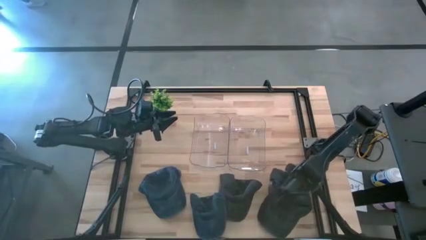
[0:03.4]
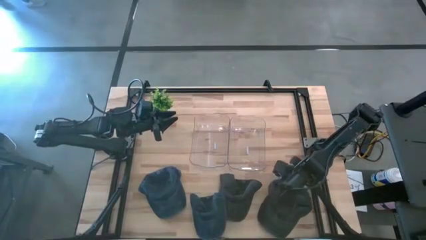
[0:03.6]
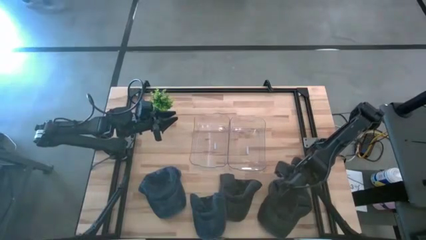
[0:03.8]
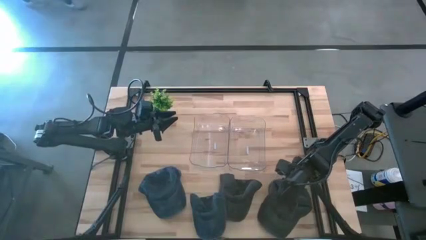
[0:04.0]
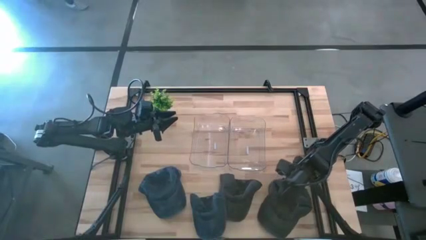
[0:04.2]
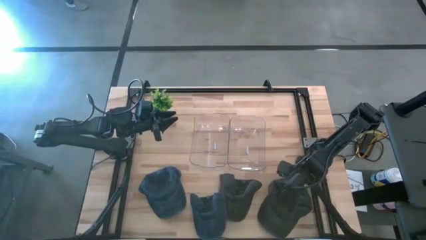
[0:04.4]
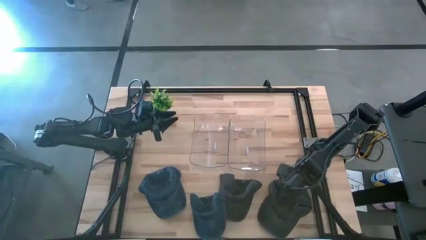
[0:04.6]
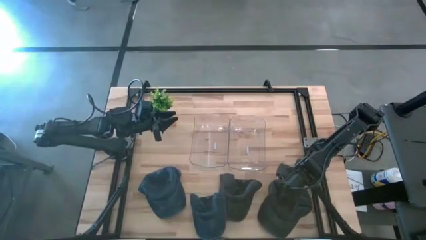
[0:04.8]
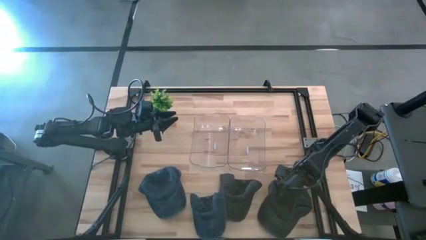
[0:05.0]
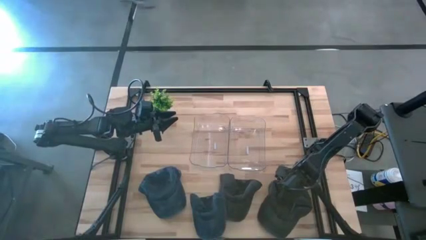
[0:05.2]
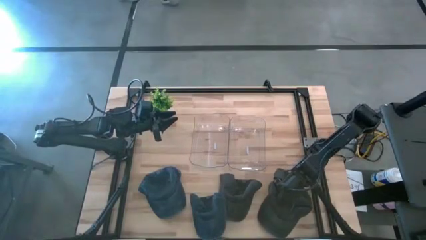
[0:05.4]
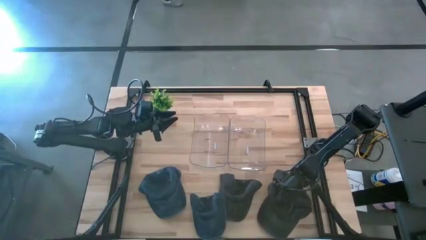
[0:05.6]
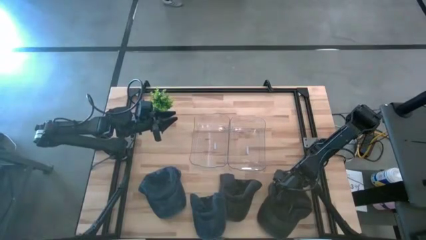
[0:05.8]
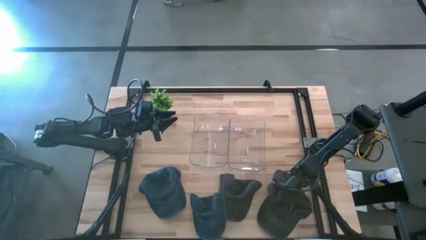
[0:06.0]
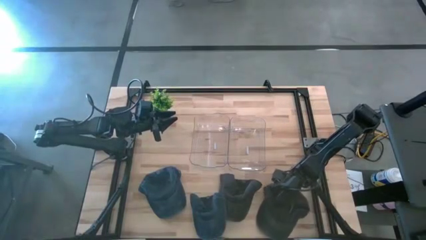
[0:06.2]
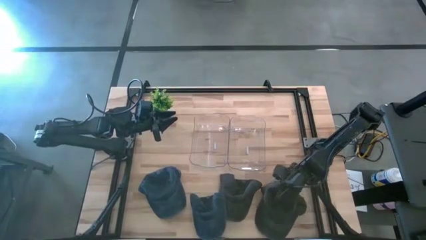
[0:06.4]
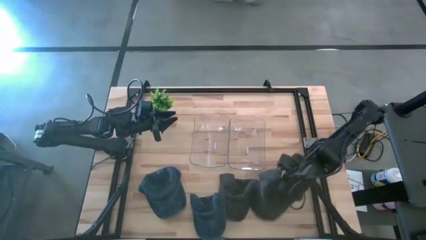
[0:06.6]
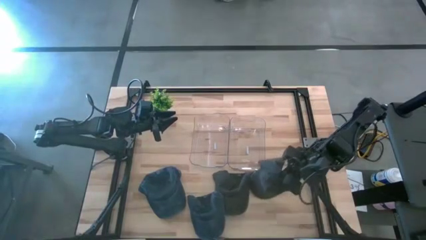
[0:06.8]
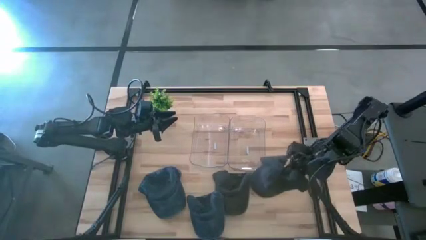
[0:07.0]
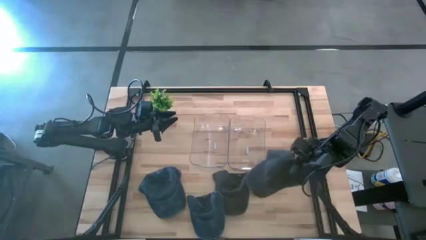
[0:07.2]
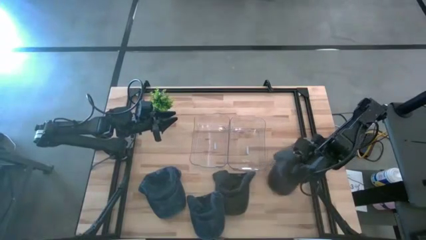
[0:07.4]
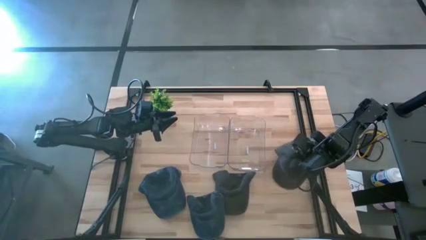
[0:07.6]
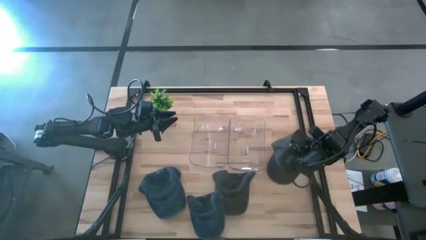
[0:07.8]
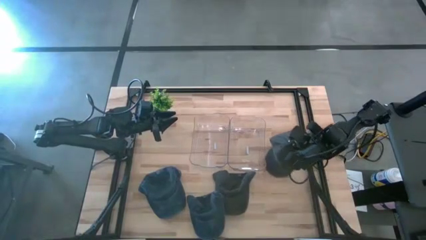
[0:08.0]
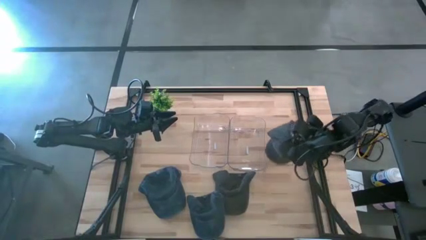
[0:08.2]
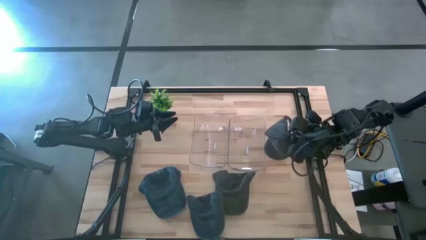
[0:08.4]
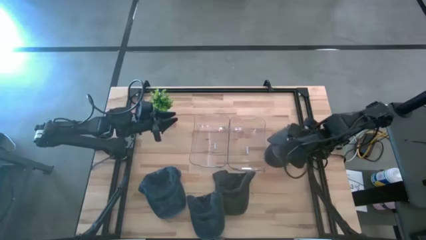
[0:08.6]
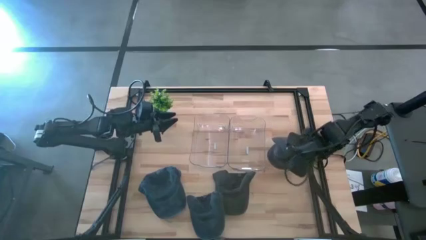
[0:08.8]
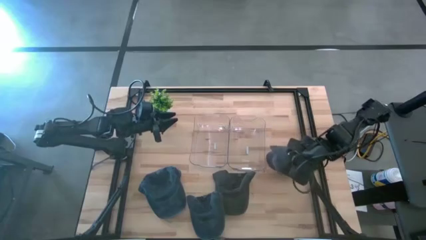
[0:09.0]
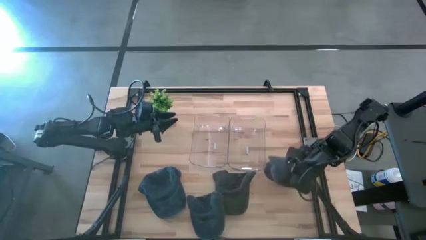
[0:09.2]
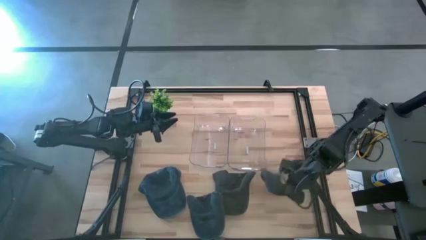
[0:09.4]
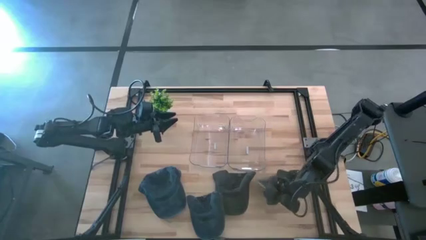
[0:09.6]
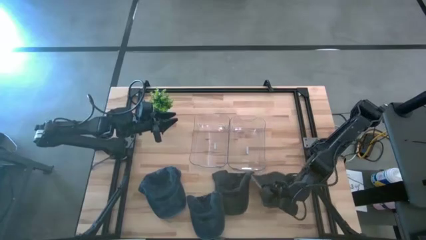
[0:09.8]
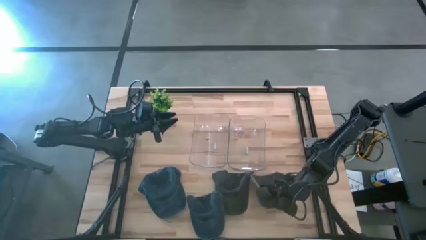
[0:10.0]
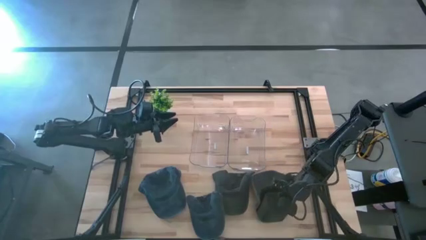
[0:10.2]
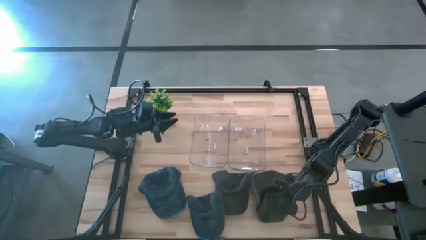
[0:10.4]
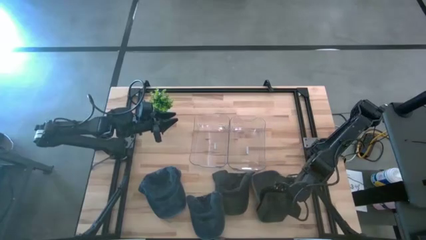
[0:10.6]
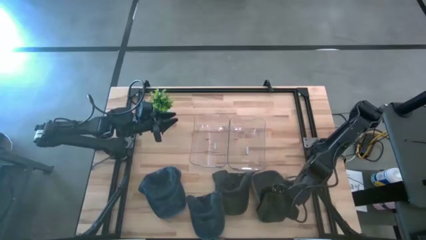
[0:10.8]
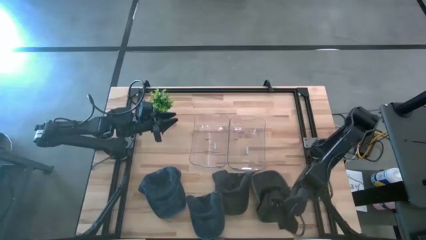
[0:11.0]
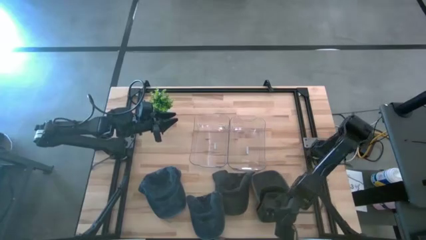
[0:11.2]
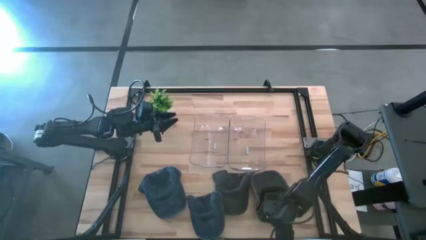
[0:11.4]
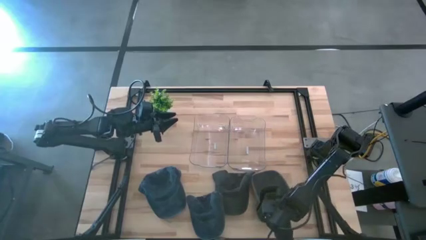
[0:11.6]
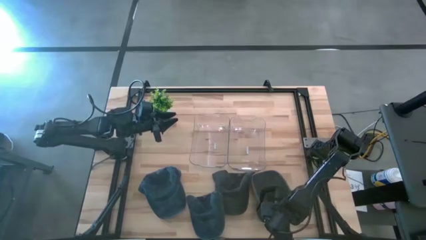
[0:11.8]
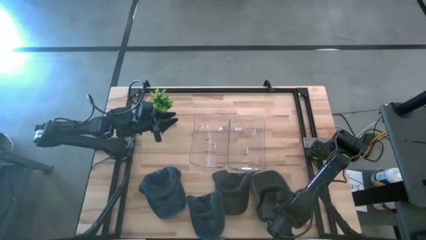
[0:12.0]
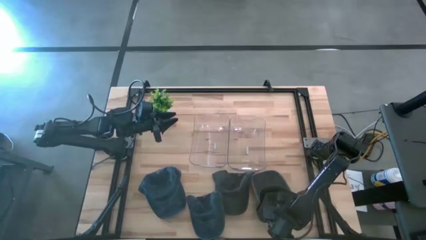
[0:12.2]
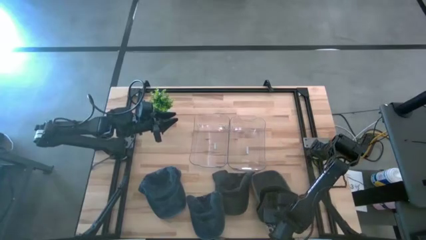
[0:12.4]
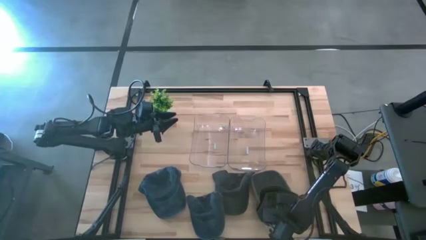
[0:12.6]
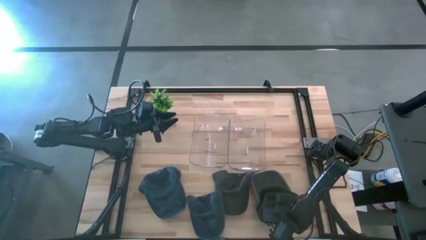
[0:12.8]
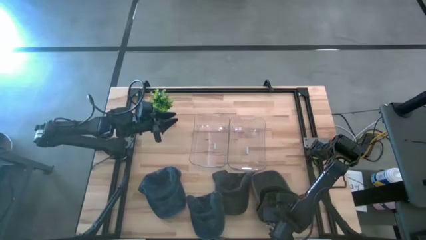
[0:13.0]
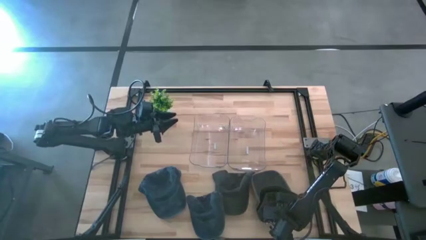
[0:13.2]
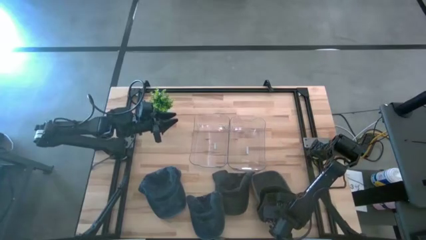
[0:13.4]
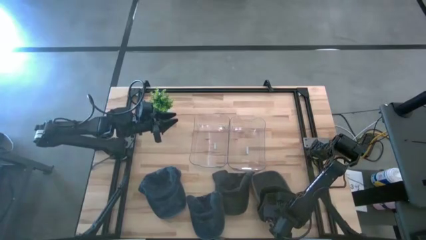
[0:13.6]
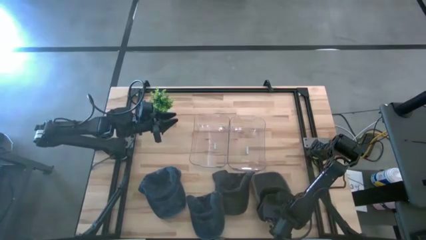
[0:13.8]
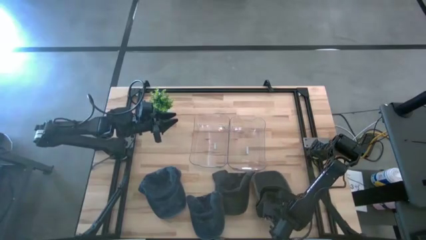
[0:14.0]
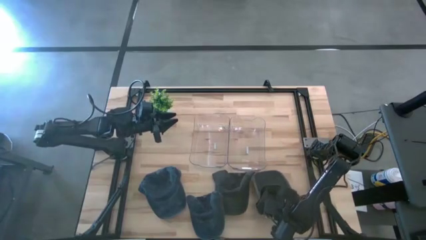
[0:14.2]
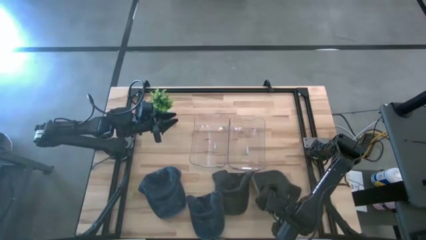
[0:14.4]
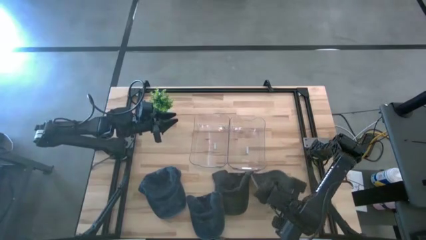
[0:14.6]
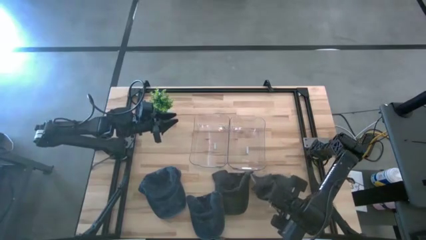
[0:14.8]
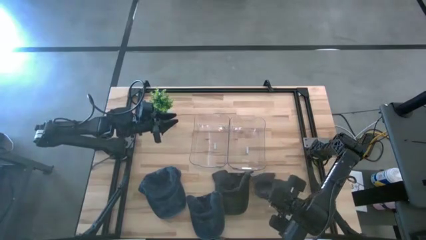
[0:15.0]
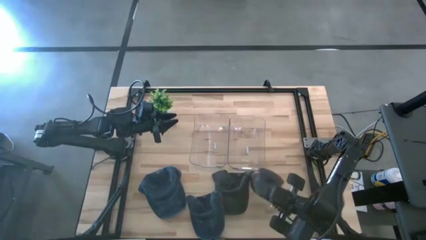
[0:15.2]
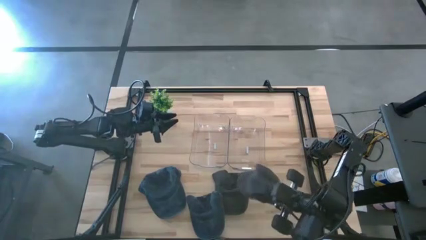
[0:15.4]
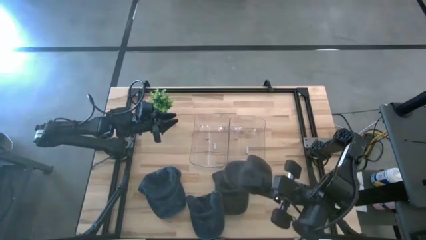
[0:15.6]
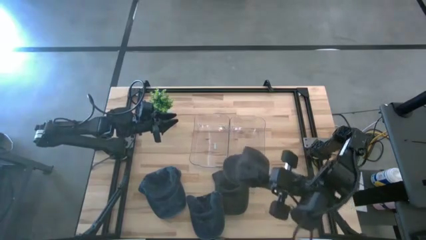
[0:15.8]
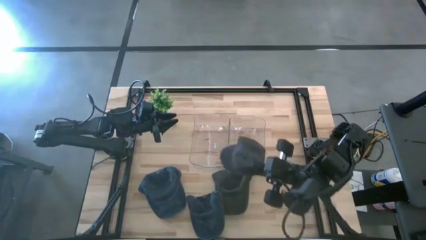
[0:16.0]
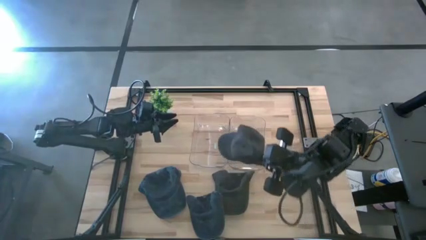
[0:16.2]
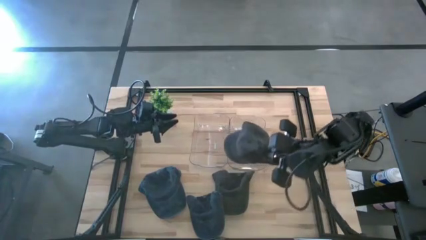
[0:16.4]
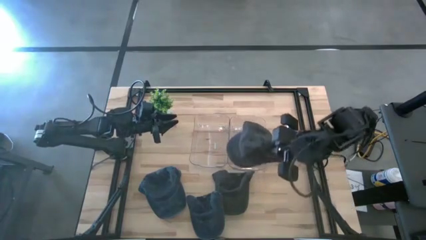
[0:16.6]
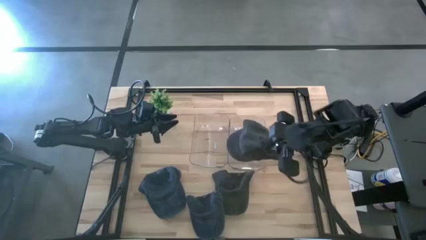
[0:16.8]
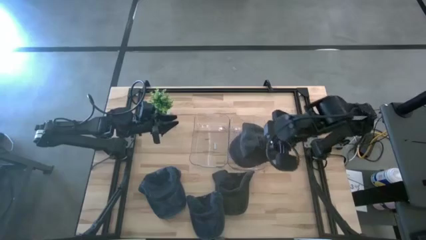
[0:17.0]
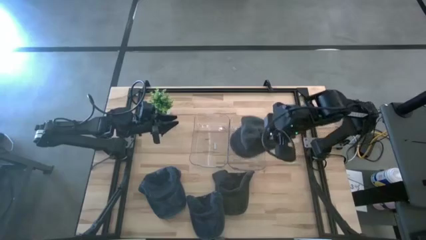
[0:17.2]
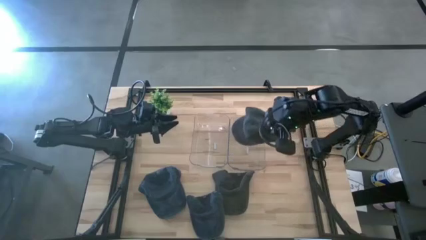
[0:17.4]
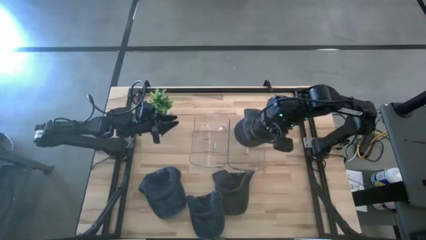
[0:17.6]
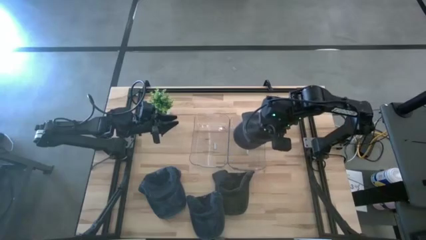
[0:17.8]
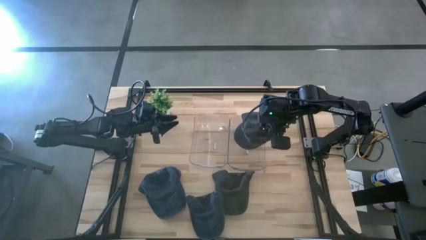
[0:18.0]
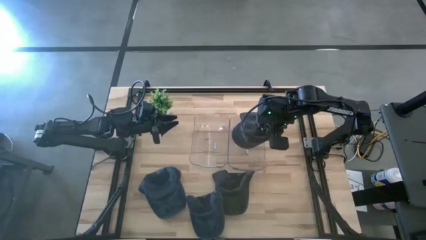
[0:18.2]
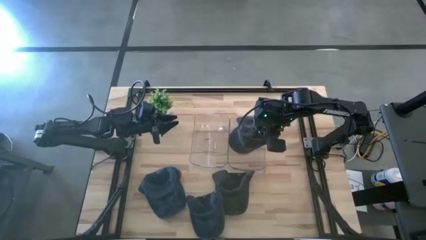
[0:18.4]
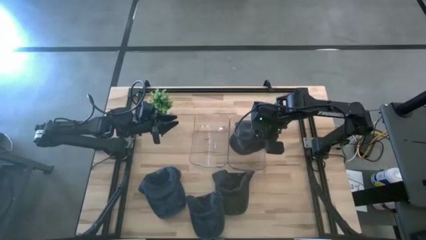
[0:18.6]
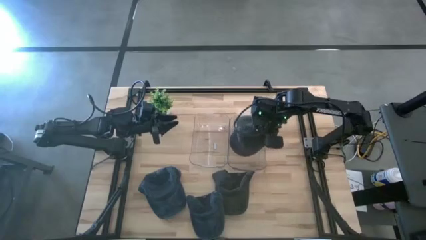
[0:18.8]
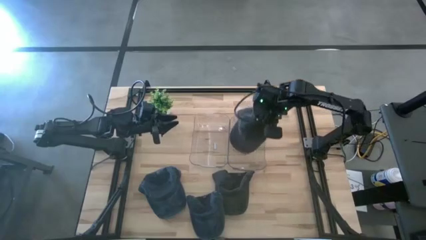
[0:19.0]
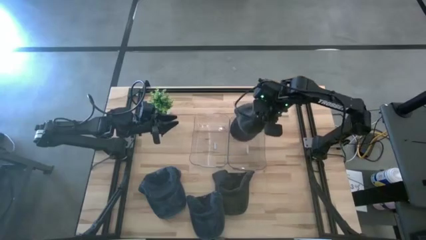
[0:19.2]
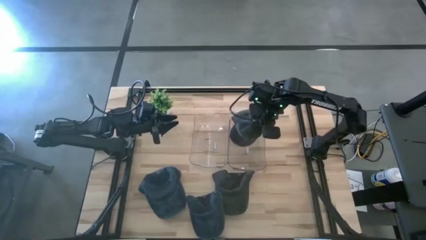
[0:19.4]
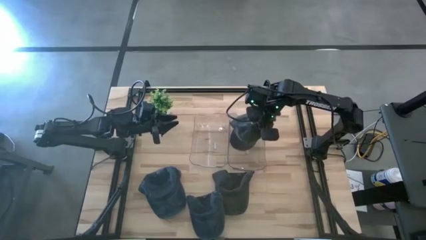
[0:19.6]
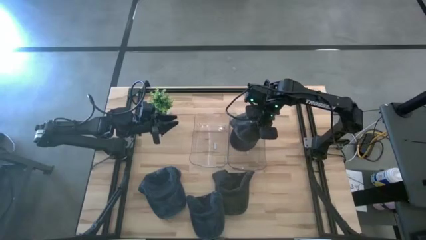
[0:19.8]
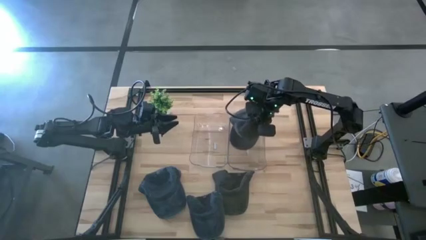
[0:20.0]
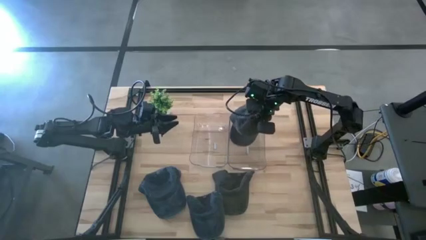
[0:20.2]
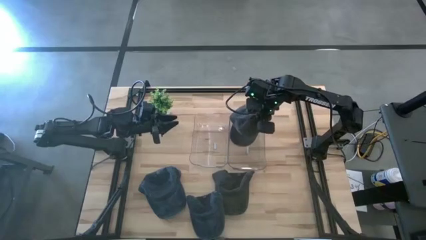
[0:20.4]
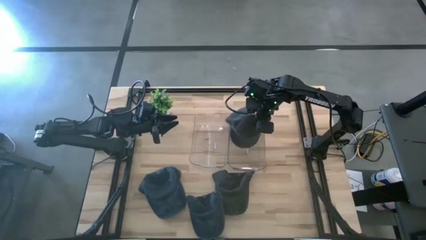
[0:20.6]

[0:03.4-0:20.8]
Task: Pick & Place hat
Put the right black cap into the right transparent bin
